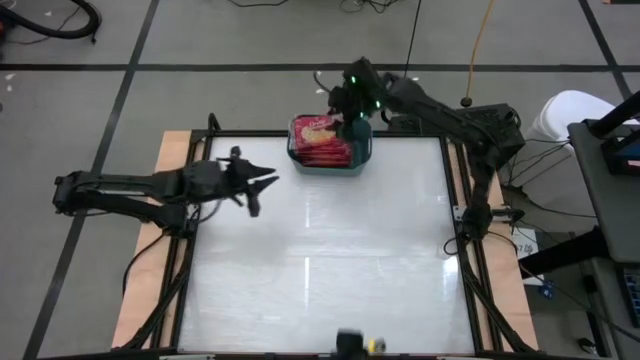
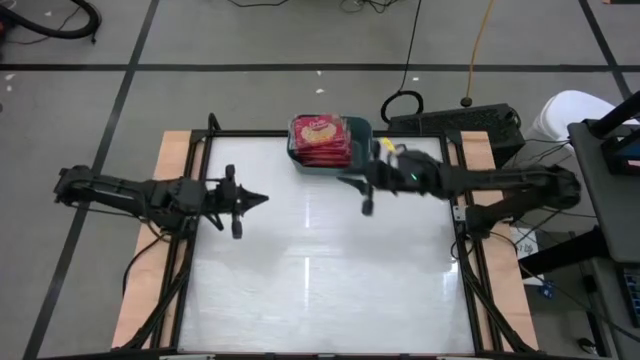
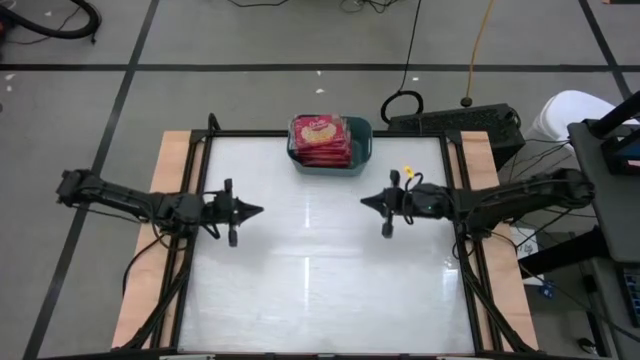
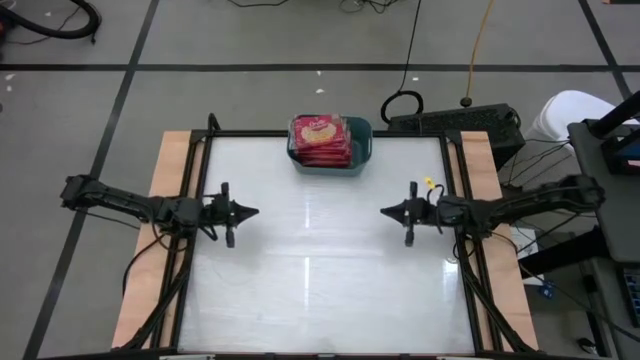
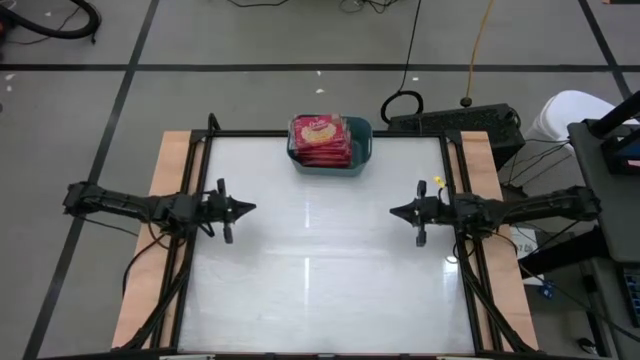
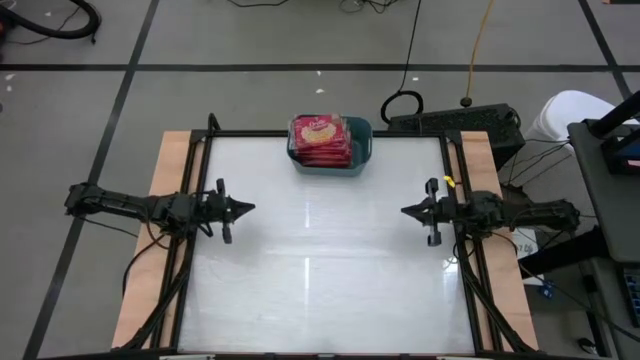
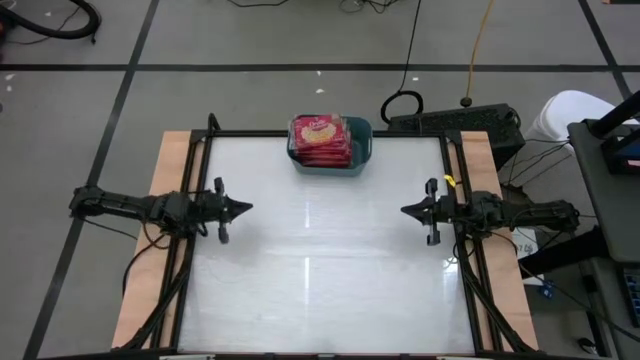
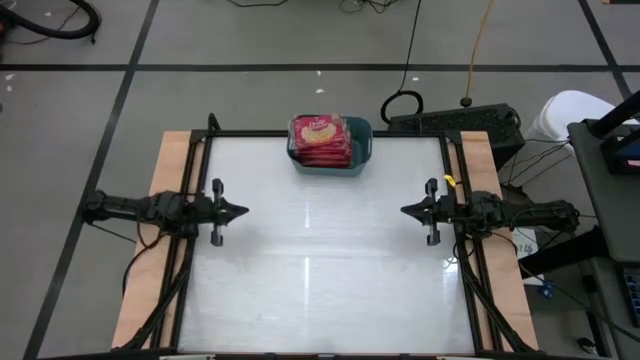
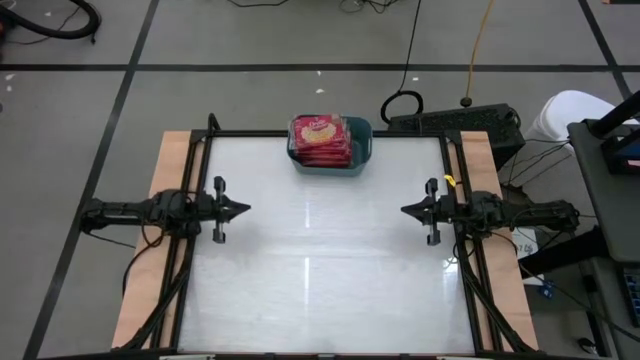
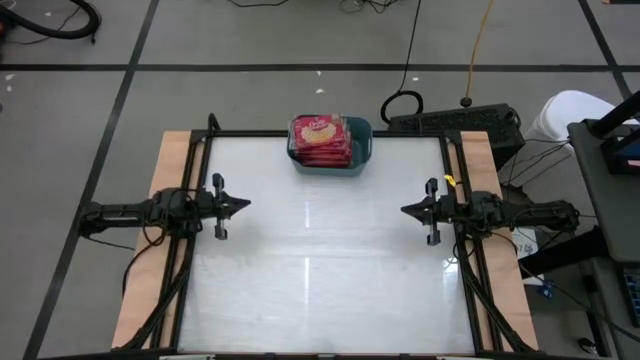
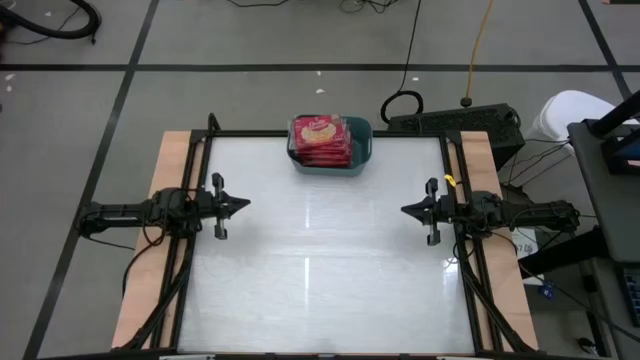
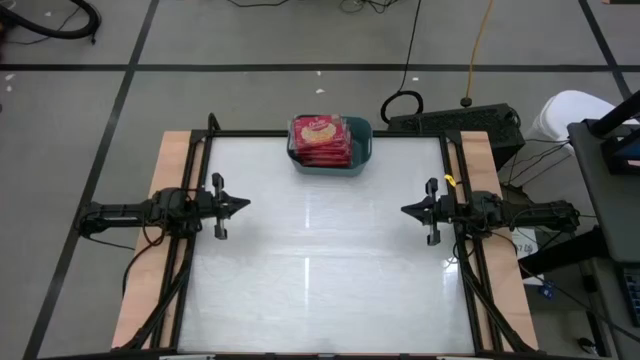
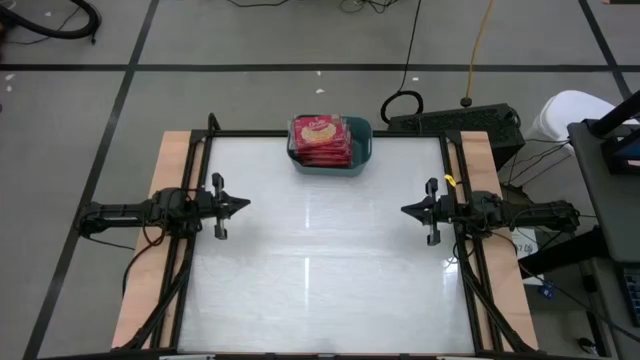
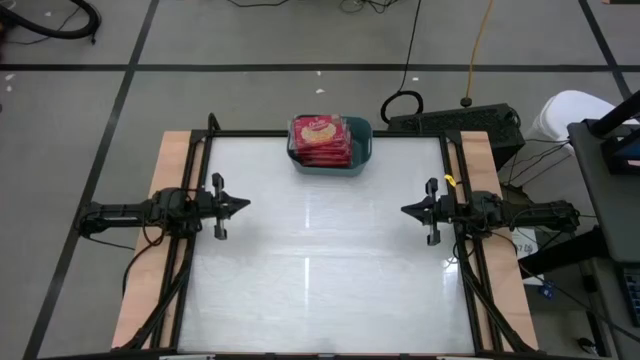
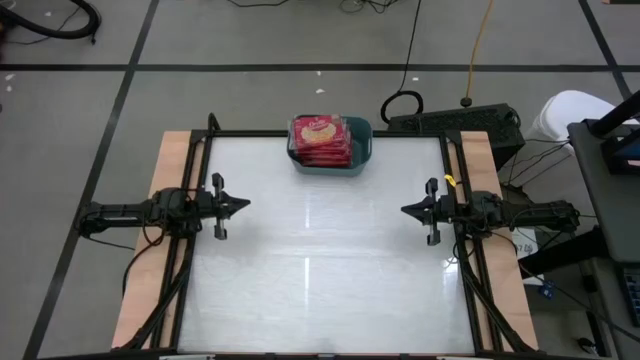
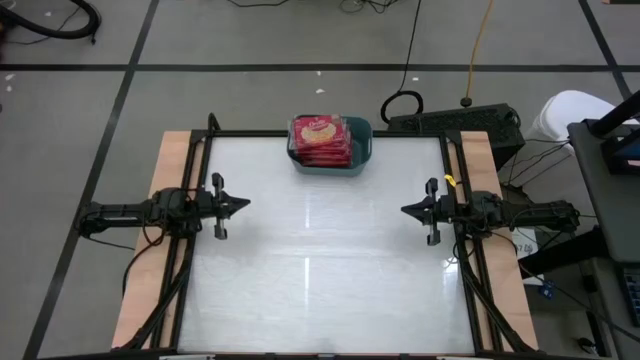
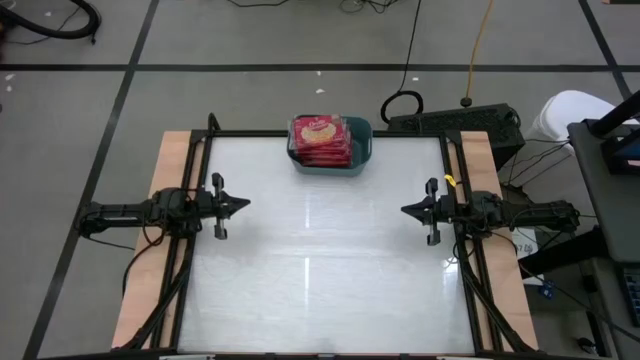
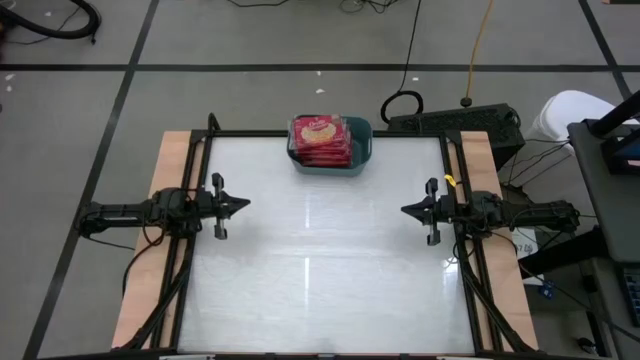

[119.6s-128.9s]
Task: Sort popcorn bags into baskets
Return to Home Position

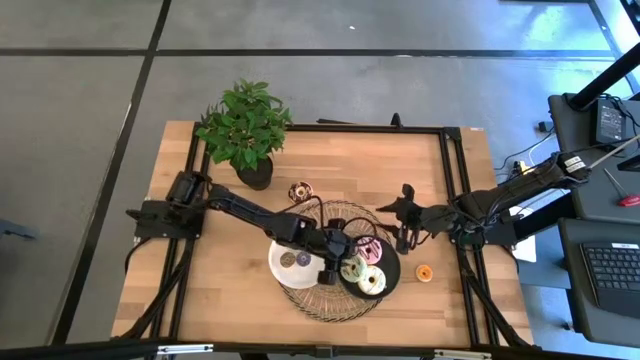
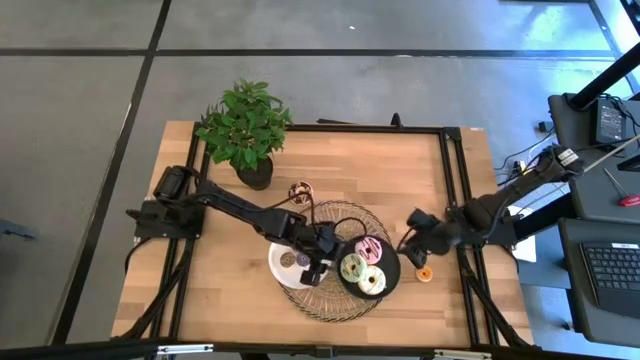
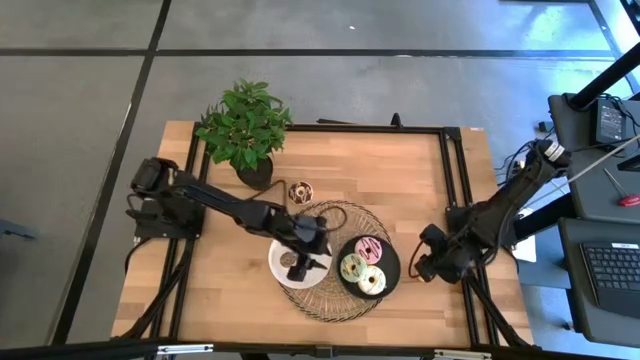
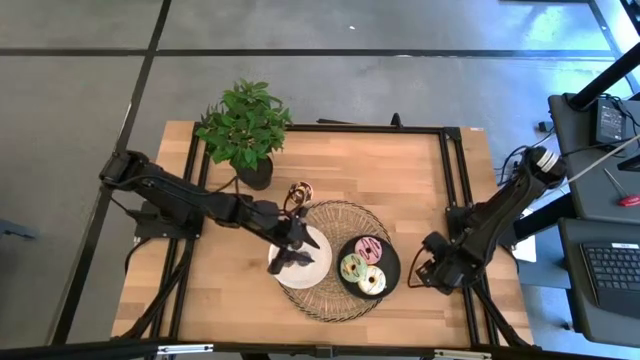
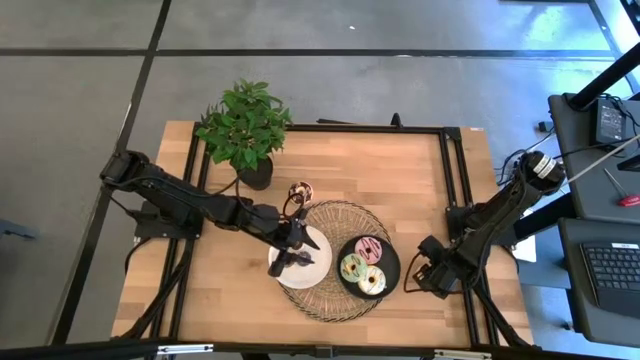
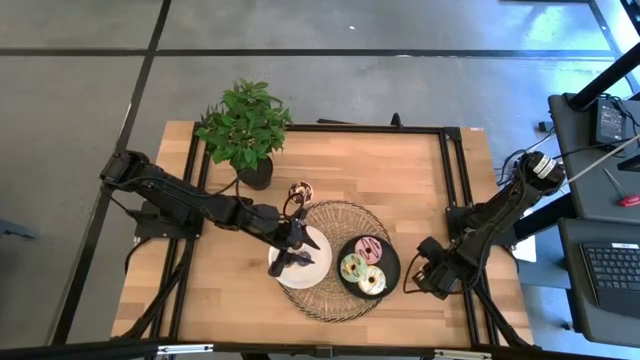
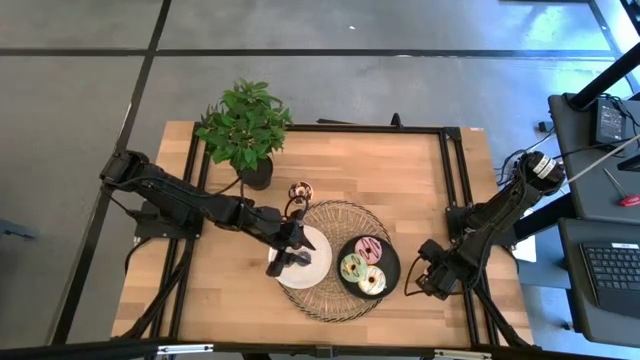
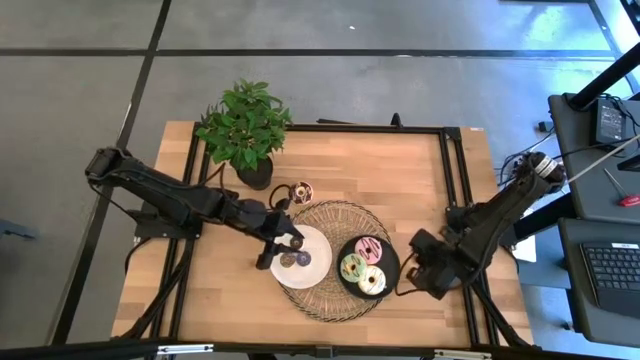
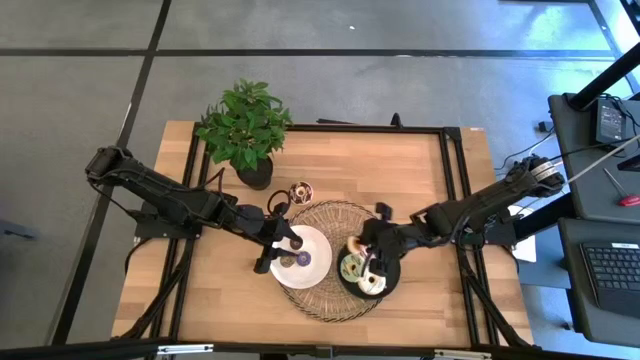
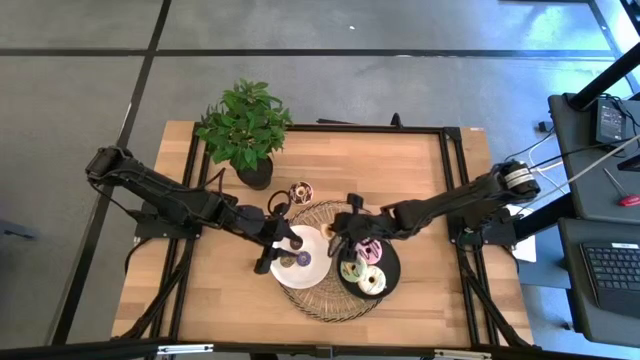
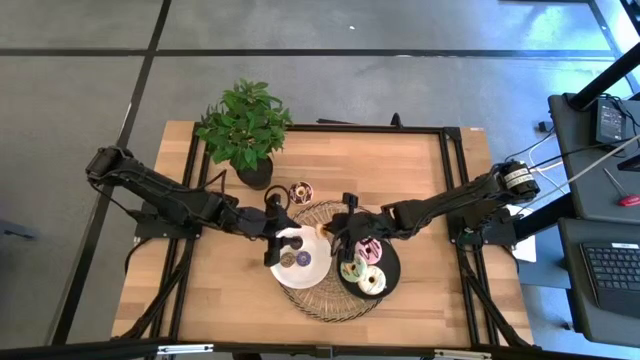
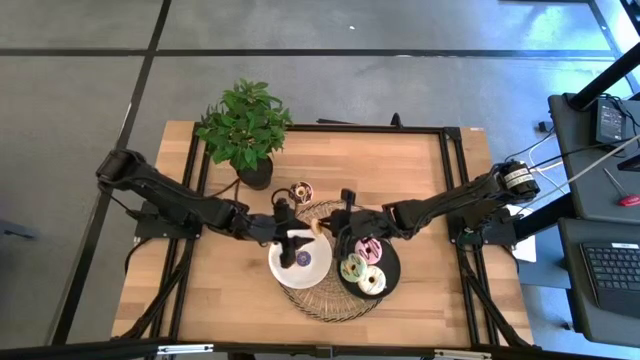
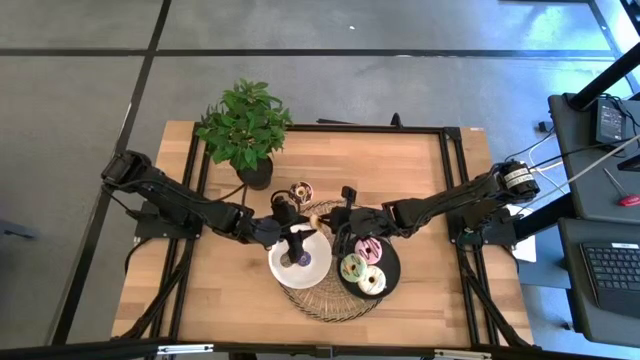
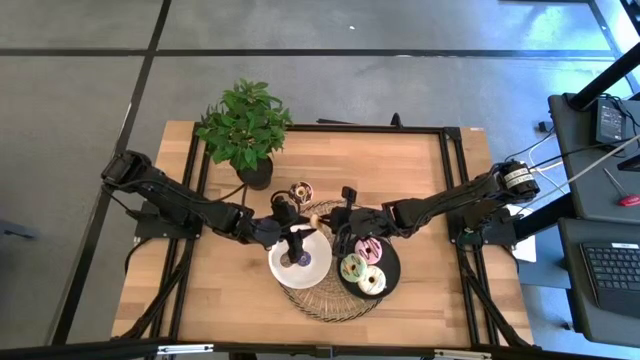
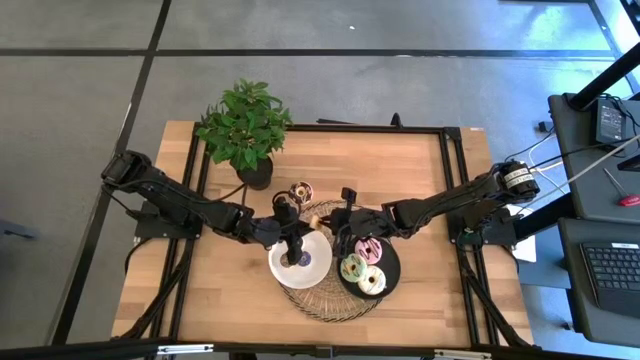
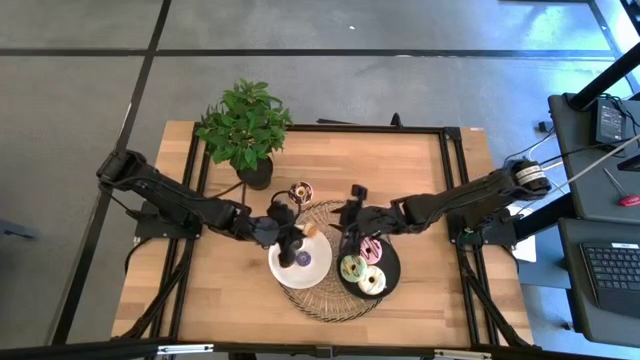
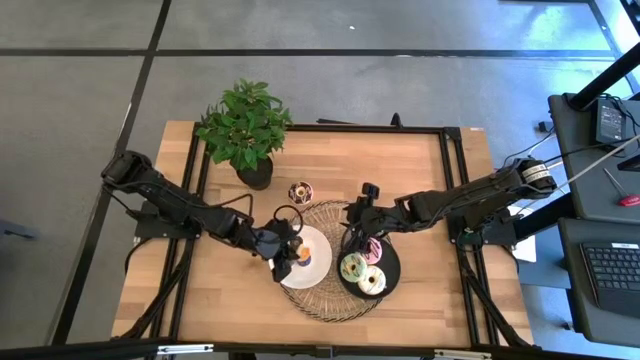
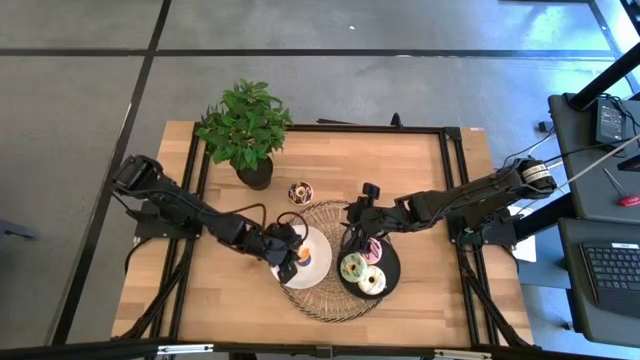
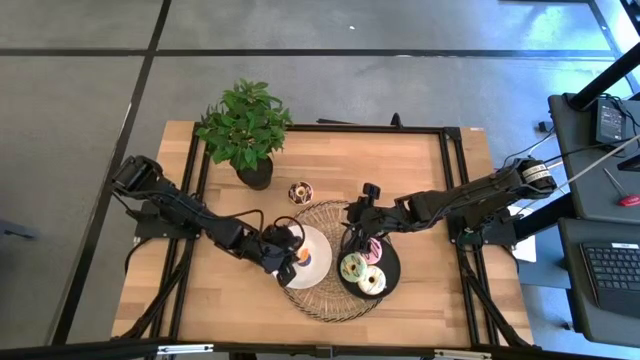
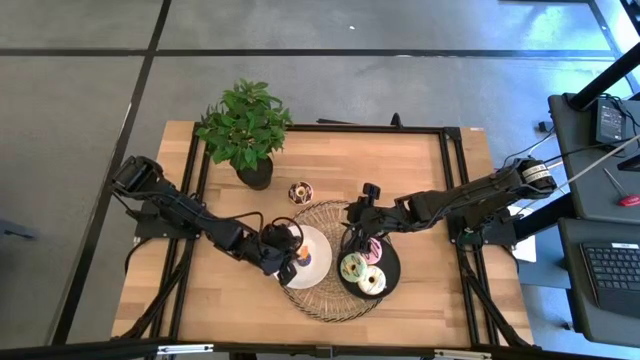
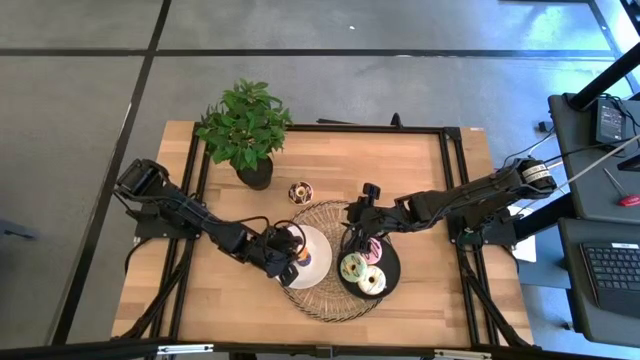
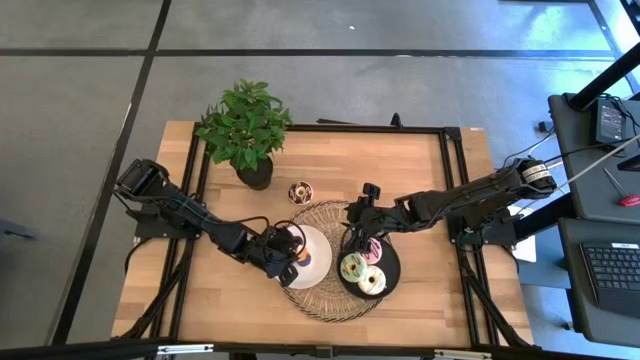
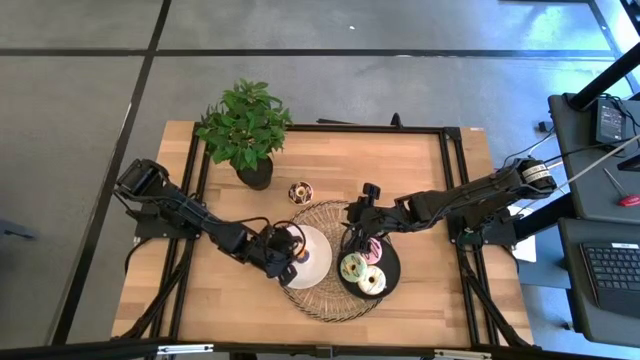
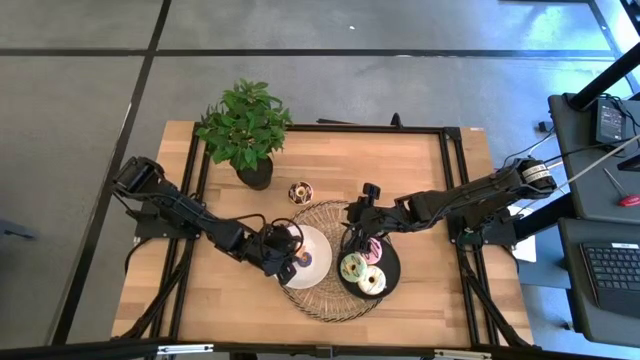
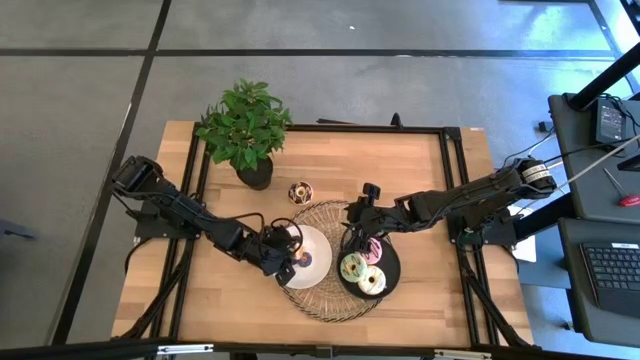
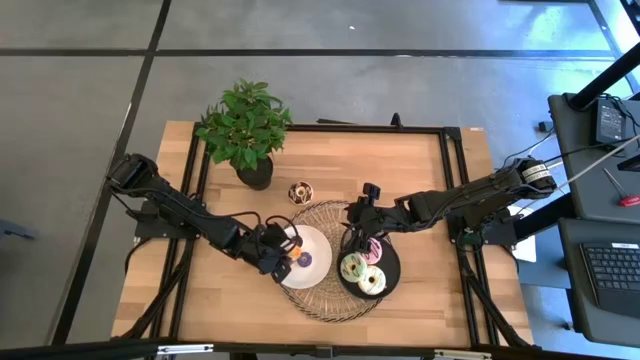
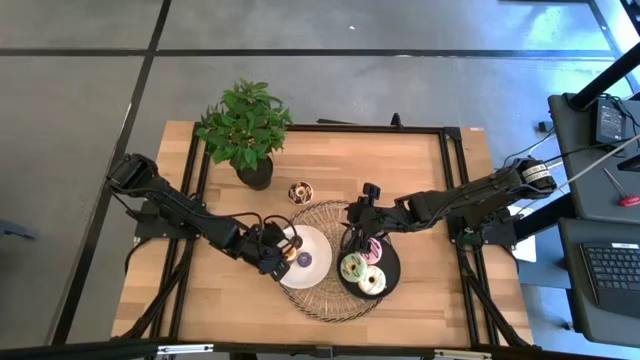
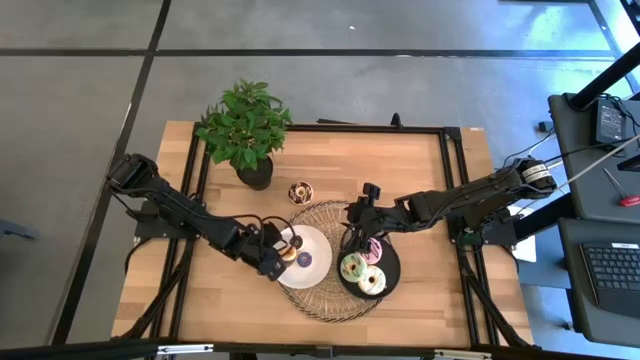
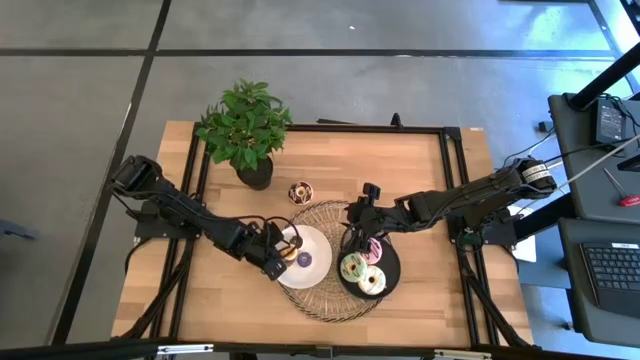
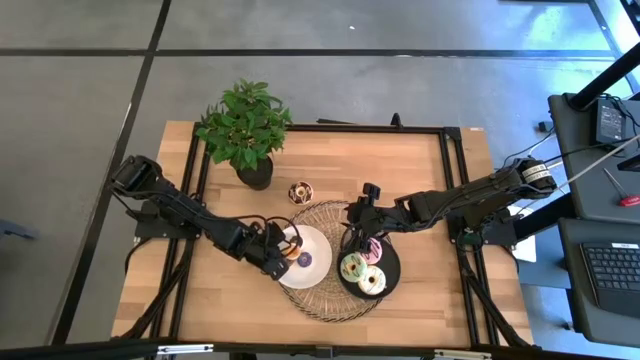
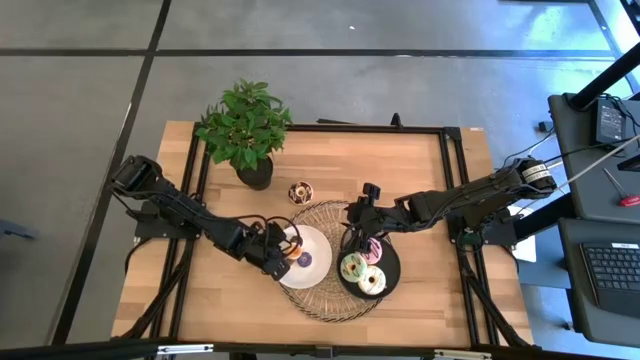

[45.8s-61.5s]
Task: Pick & Place donuts
Put the small orange donut on the white plate
